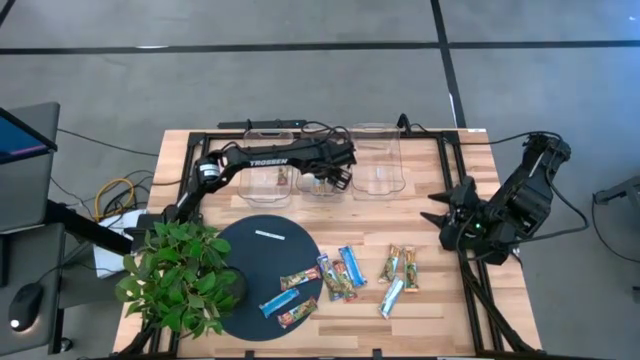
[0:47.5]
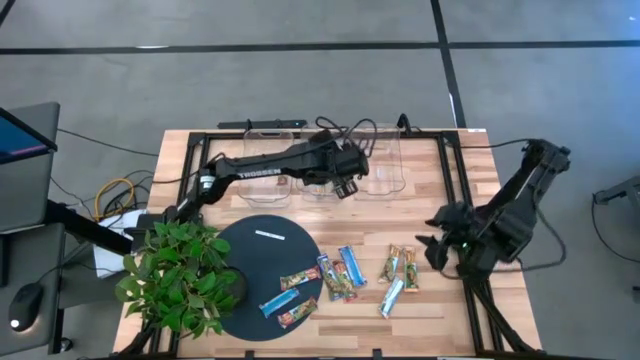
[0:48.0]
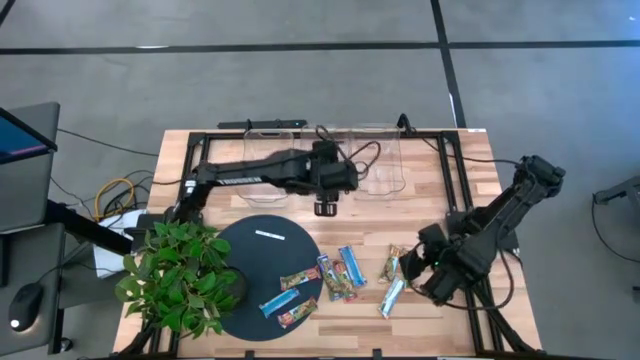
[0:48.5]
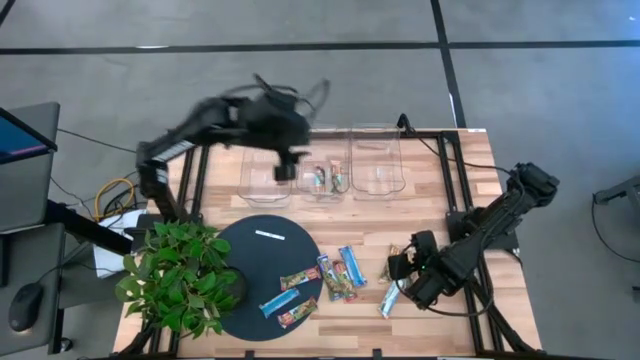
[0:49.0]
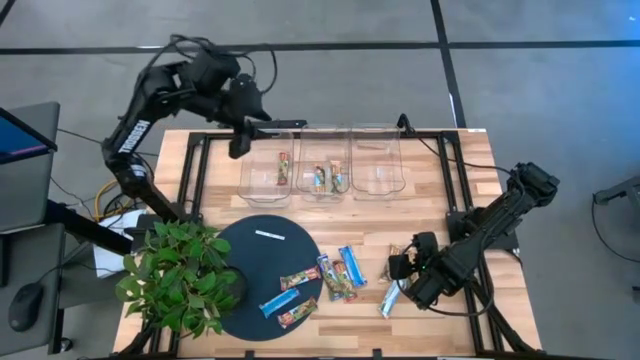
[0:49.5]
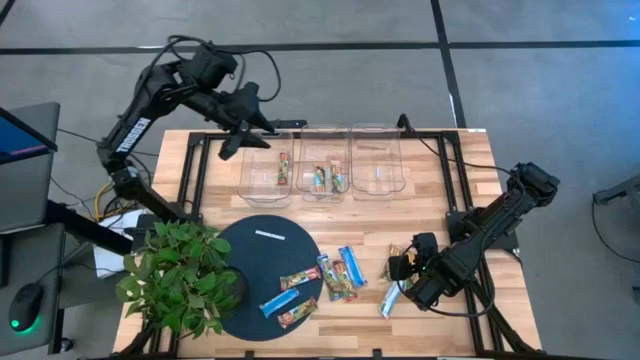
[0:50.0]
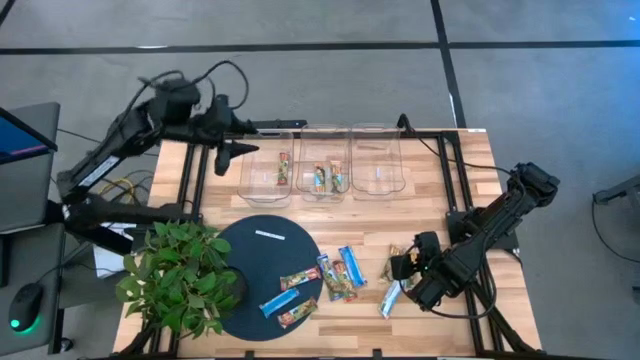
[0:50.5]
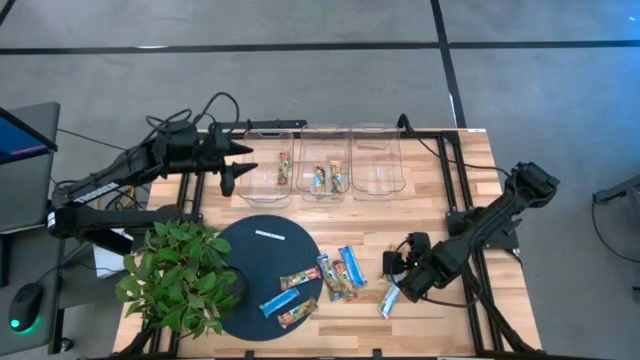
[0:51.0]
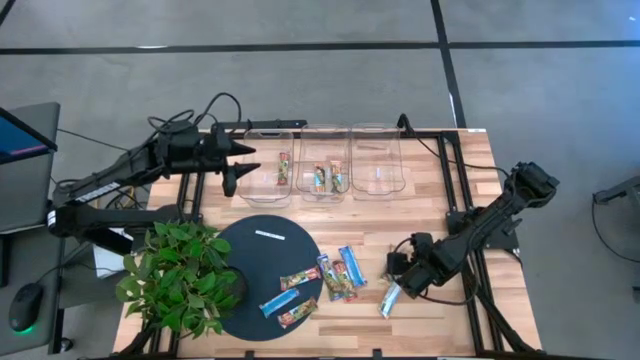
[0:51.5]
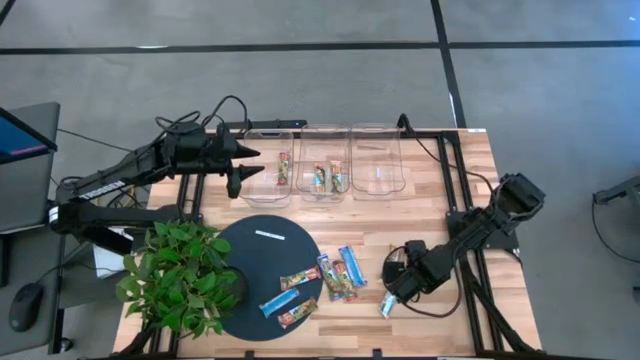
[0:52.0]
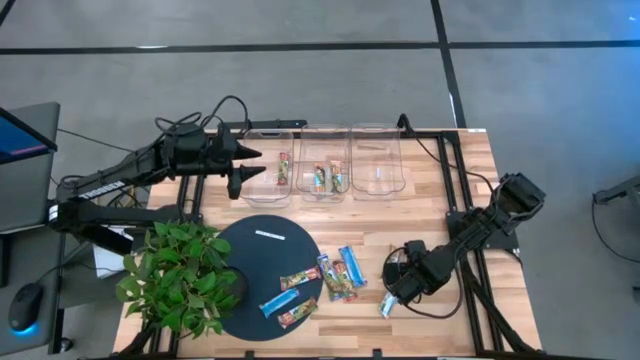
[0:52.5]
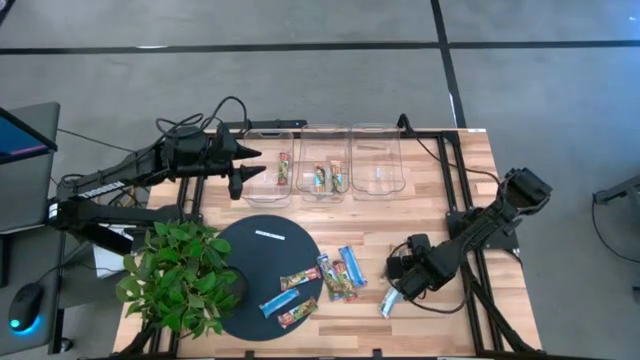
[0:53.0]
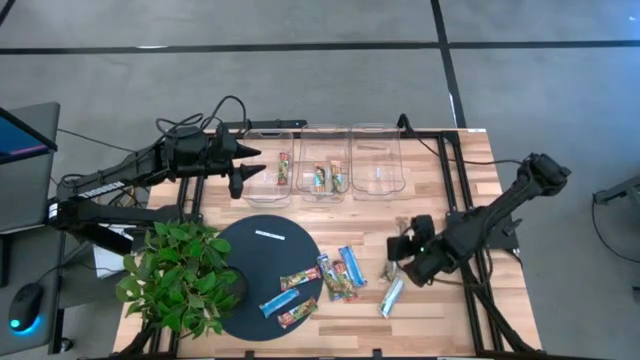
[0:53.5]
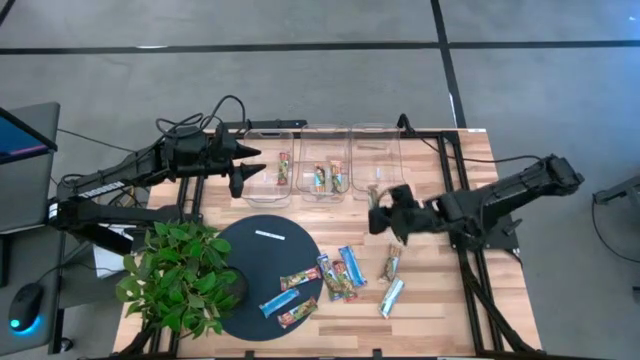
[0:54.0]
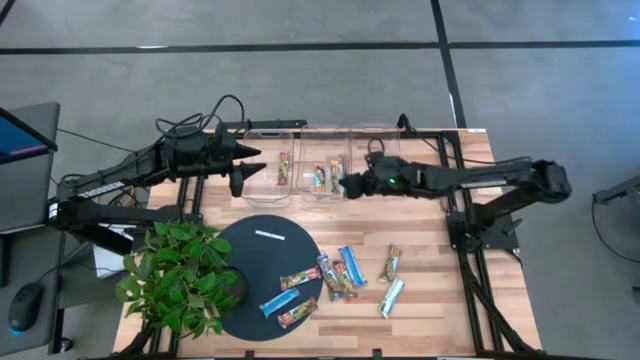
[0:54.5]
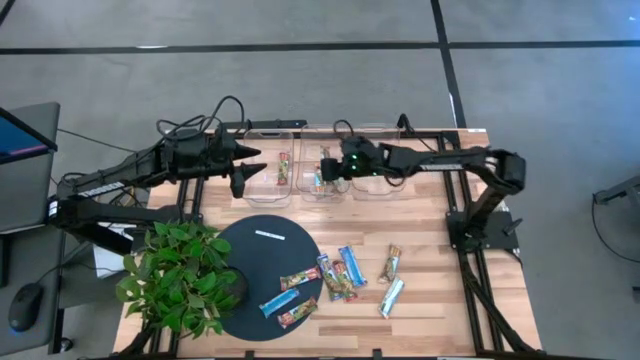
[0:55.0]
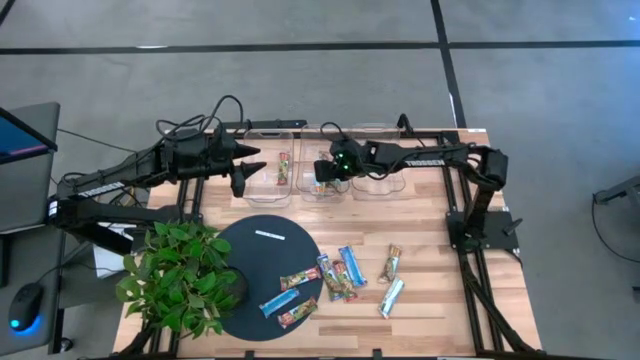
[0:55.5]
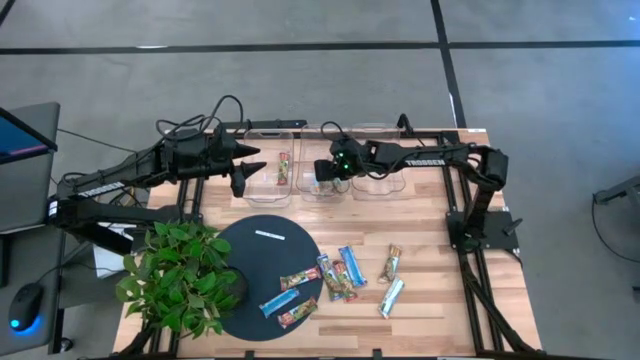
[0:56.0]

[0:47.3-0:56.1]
Task: Pick and place Granola Bars by type
Put the yellow granola bar into the middle transparent bin

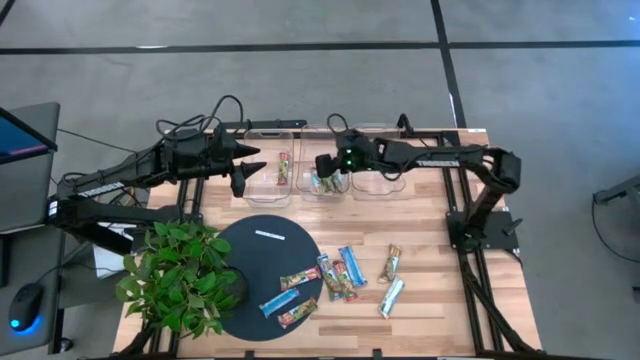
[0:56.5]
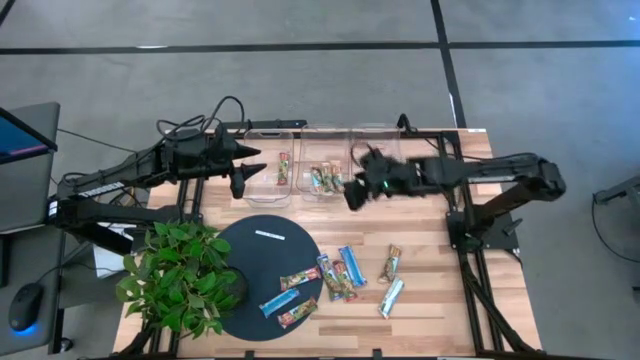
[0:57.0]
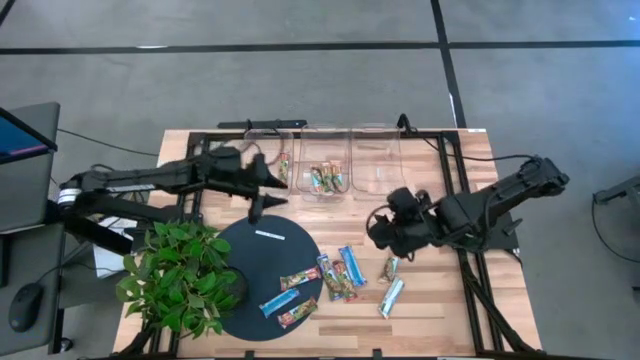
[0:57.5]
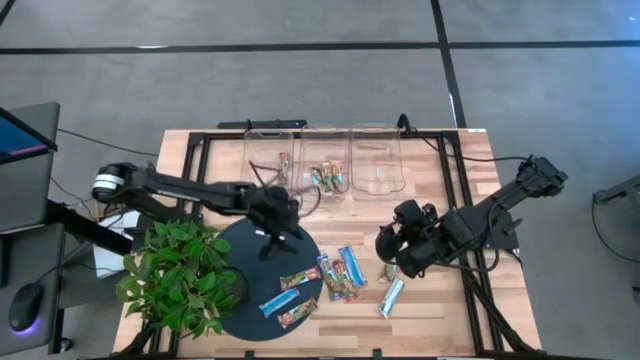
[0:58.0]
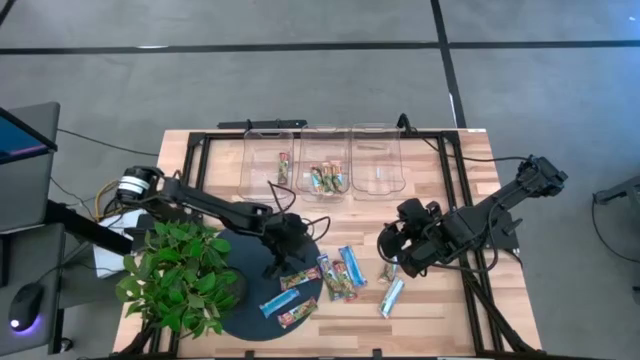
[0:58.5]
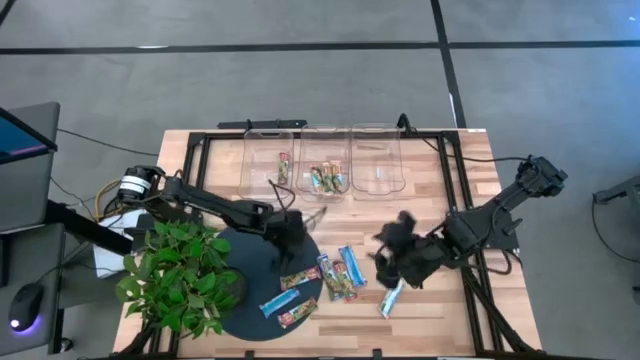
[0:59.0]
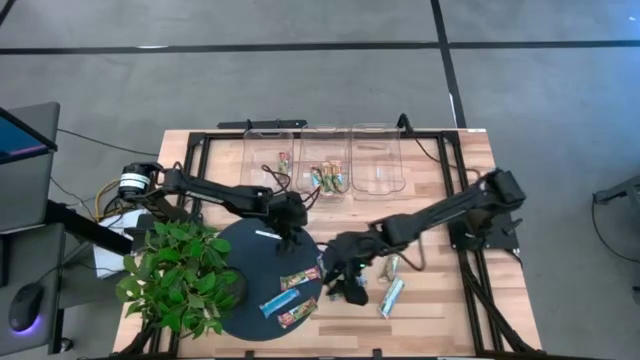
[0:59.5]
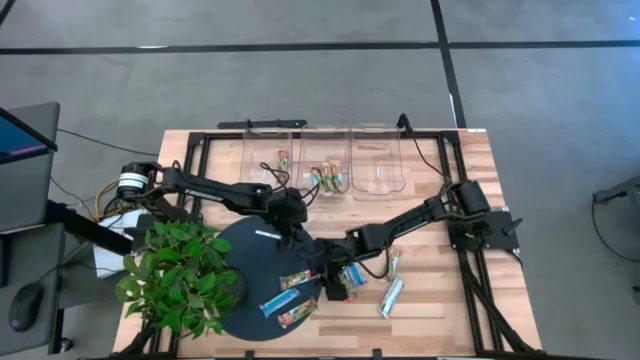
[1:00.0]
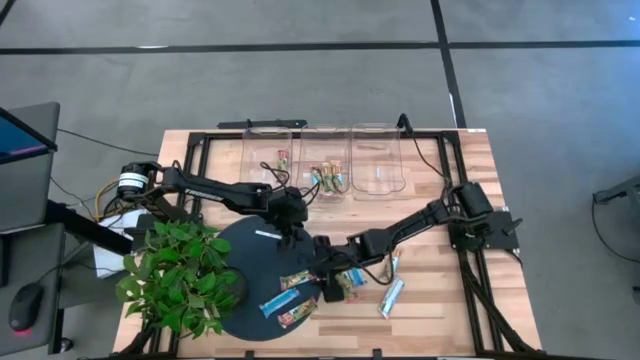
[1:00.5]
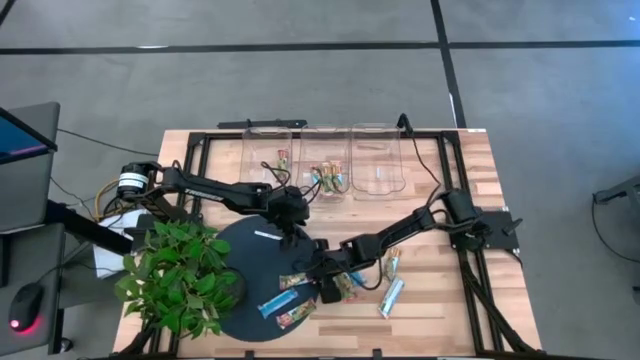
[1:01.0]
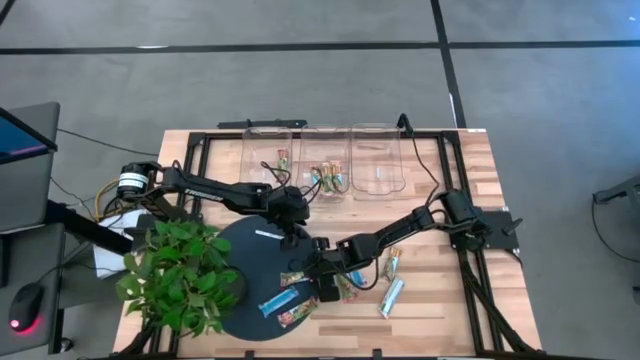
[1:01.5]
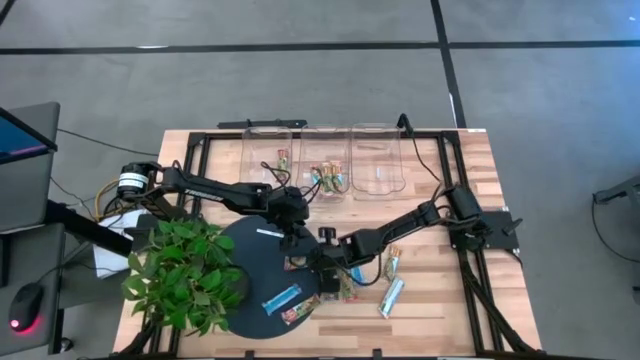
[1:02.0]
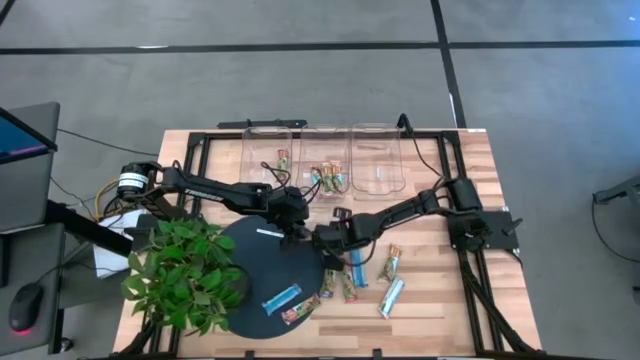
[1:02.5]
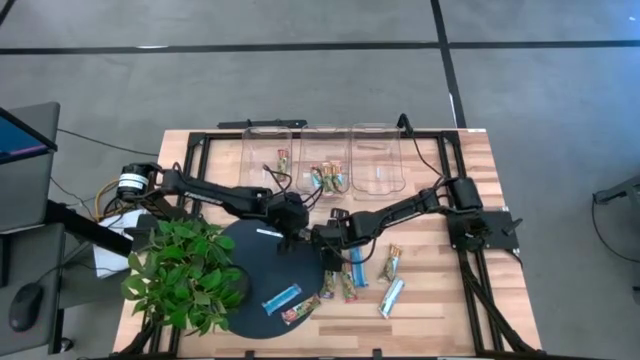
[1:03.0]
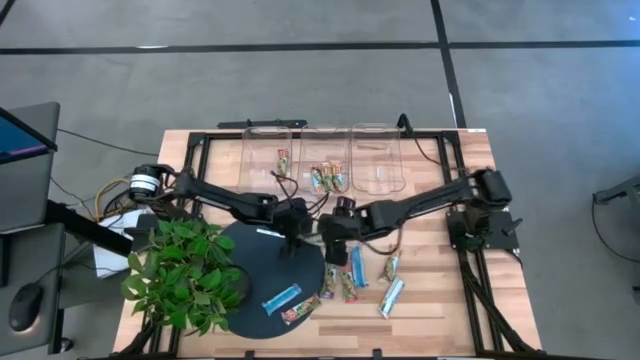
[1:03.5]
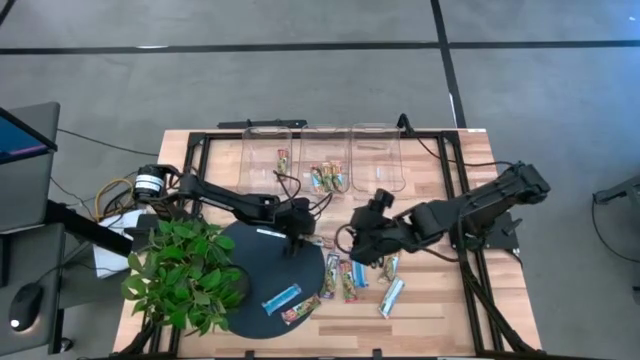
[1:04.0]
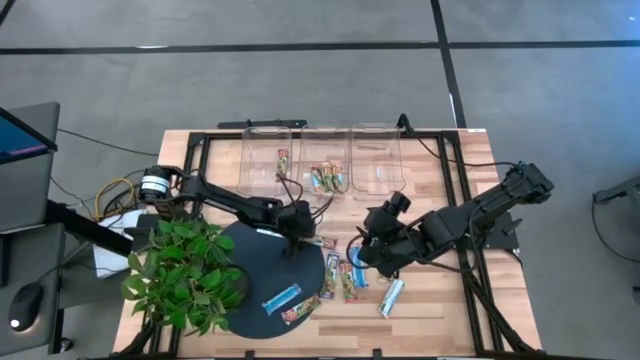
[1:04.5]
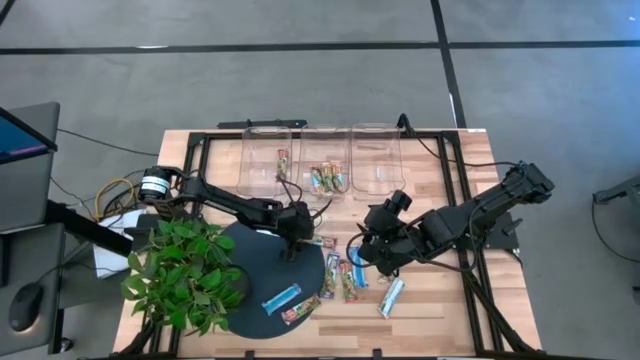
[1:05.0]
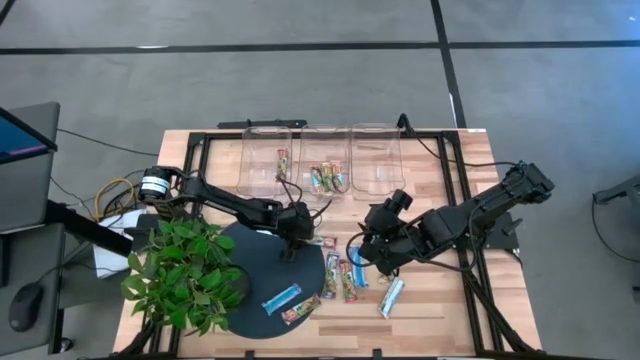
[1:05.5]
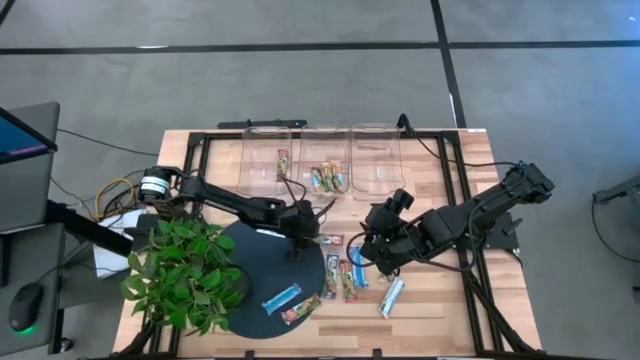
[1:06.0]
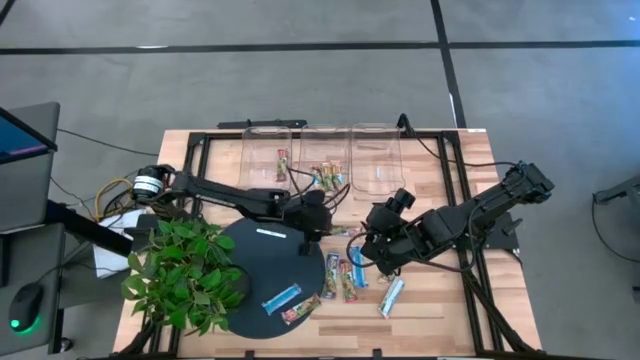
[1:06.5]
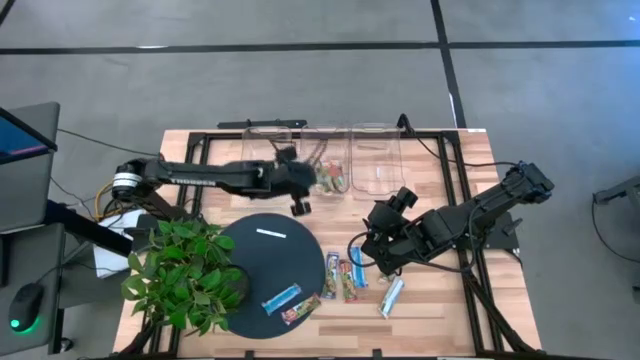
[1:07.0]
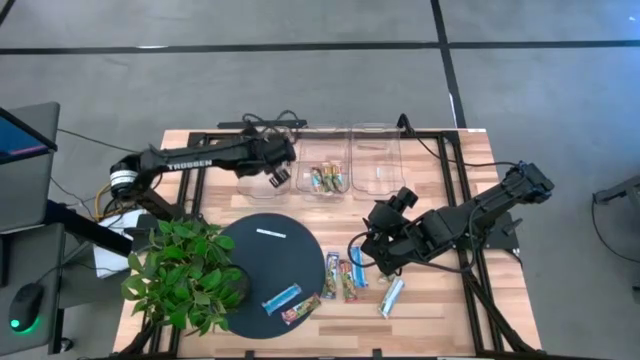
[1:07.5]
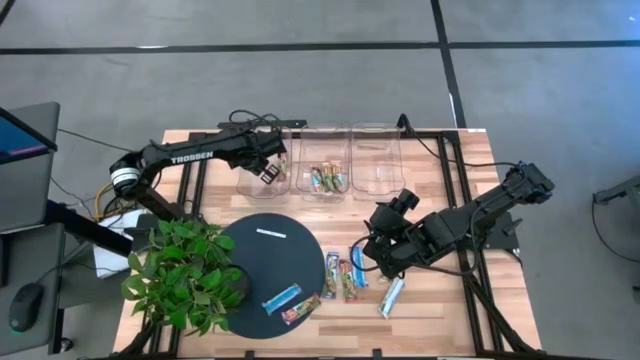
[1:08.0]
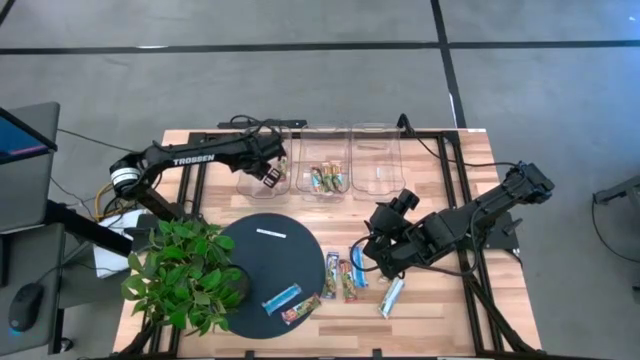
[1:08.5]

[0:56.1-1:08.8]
Put the red granola bar into the left transparent bin
